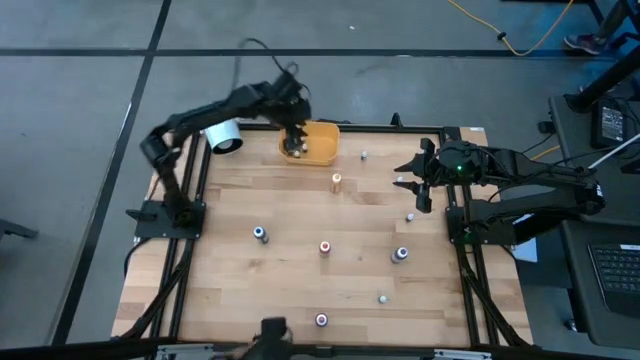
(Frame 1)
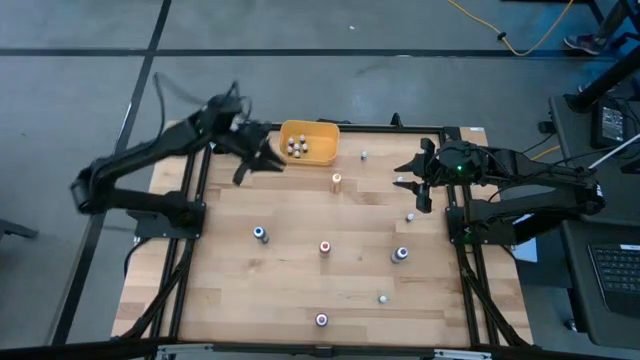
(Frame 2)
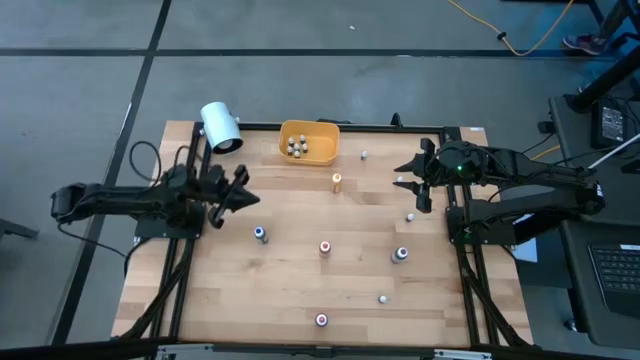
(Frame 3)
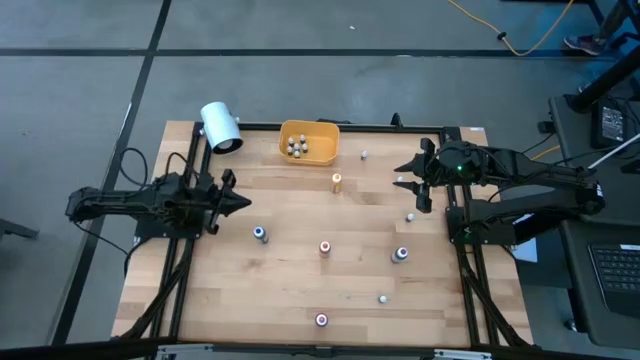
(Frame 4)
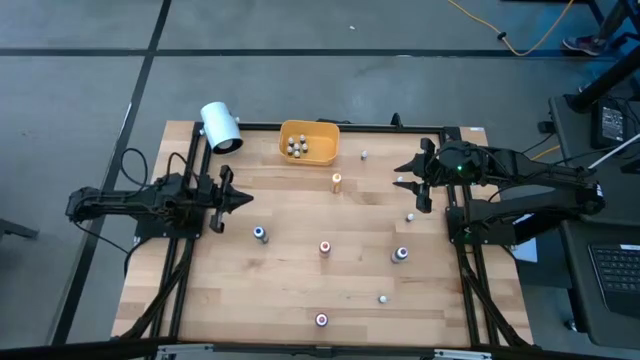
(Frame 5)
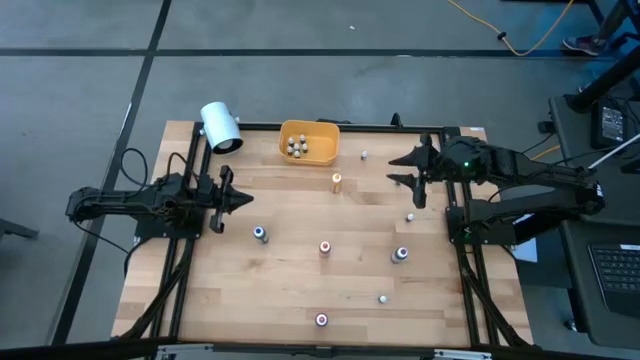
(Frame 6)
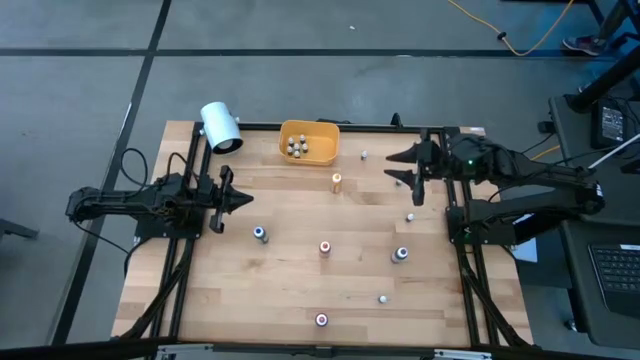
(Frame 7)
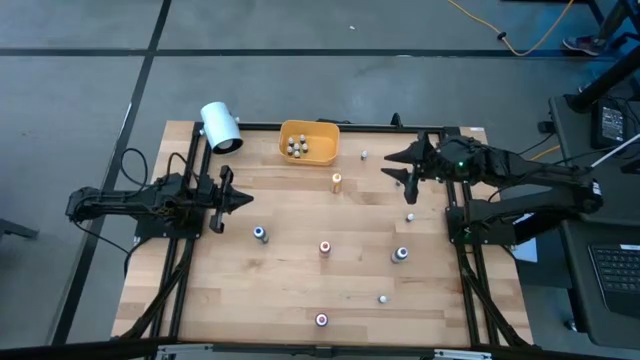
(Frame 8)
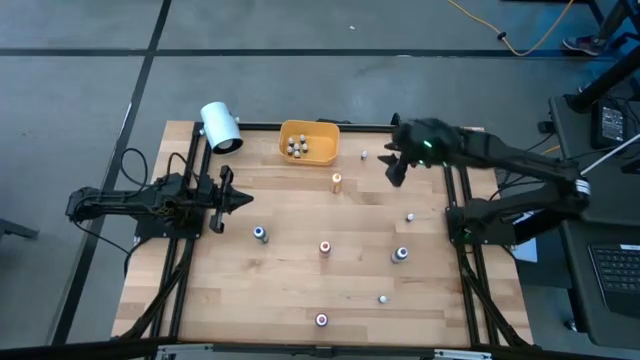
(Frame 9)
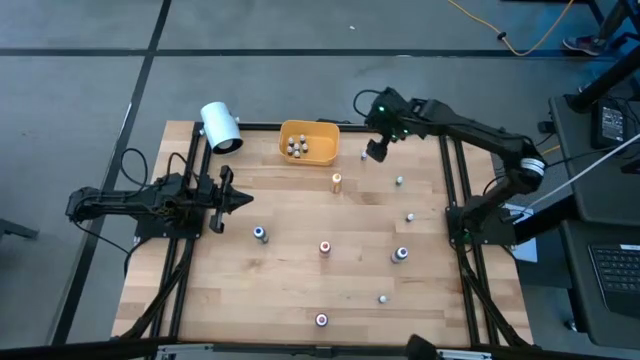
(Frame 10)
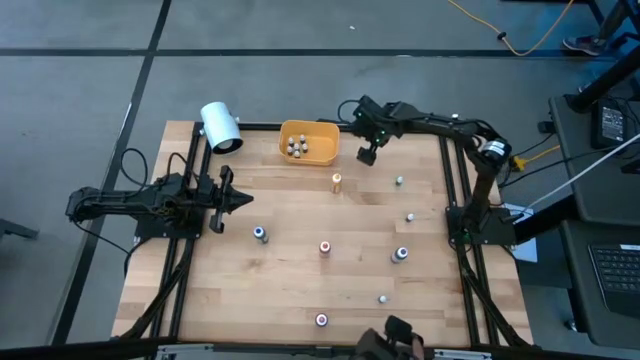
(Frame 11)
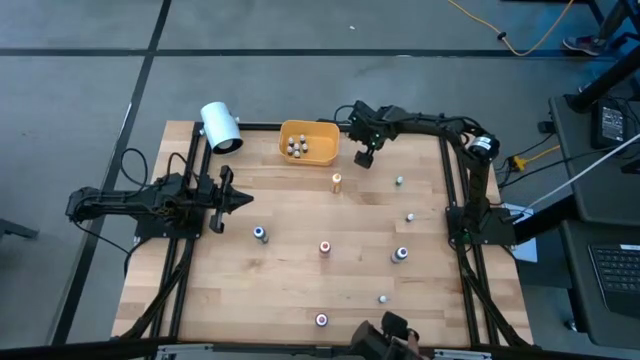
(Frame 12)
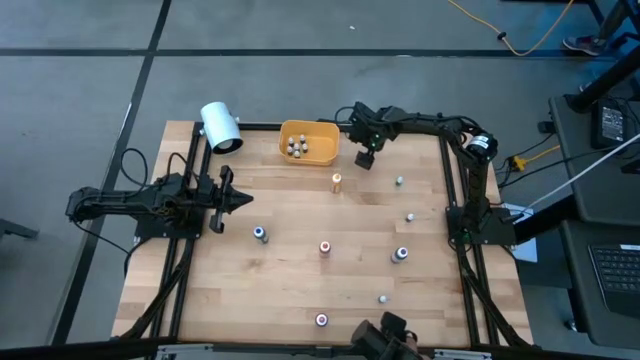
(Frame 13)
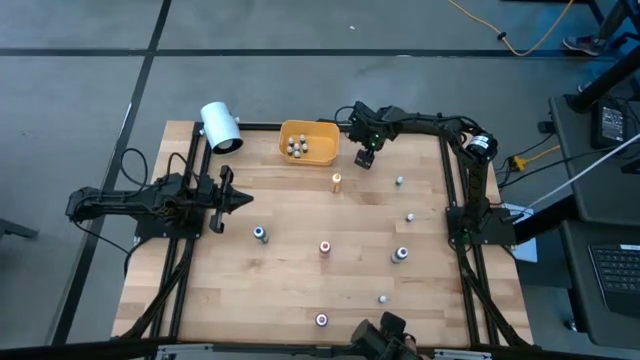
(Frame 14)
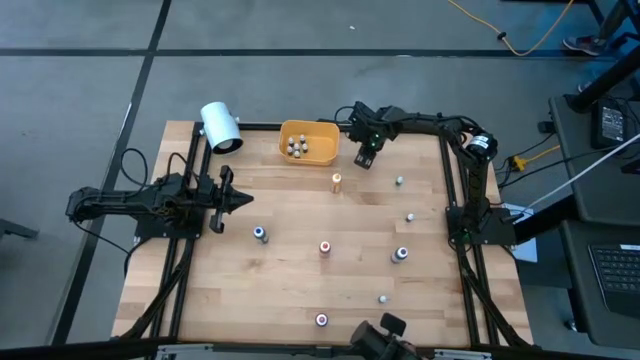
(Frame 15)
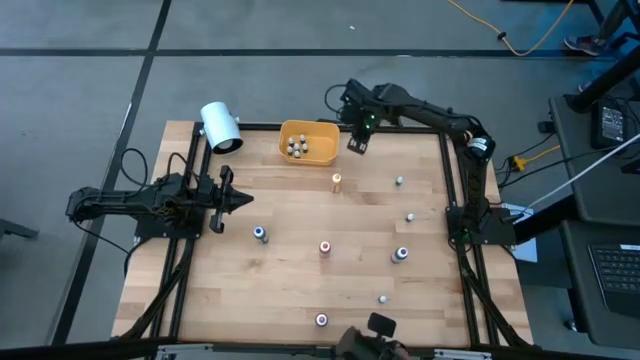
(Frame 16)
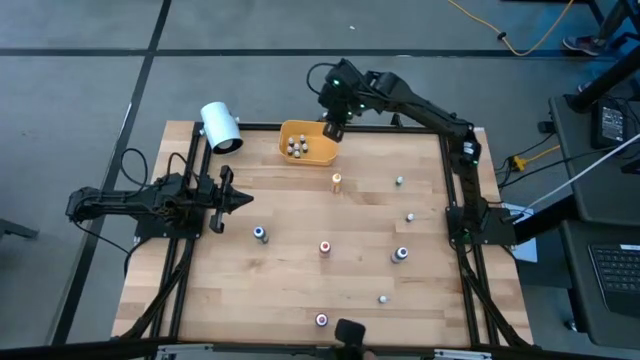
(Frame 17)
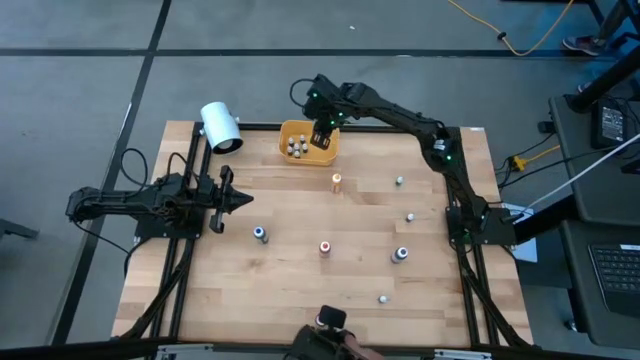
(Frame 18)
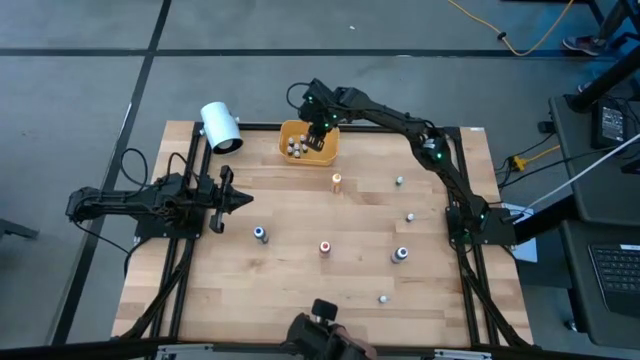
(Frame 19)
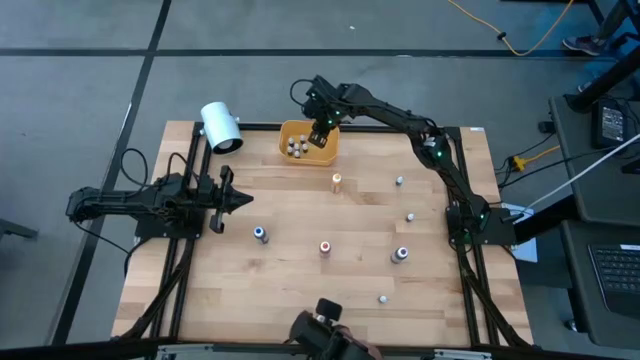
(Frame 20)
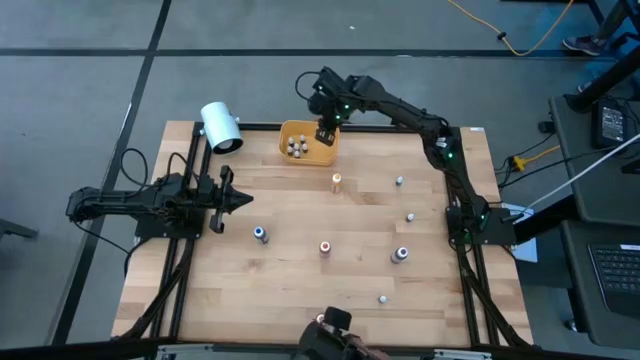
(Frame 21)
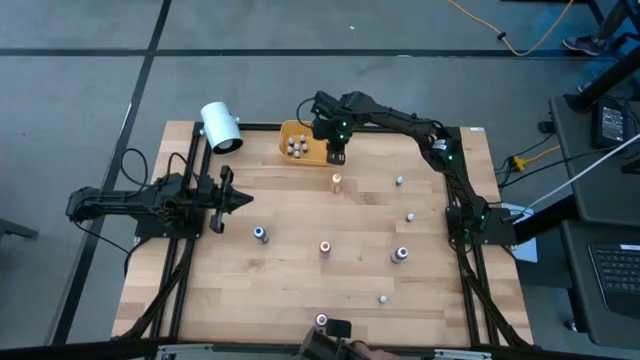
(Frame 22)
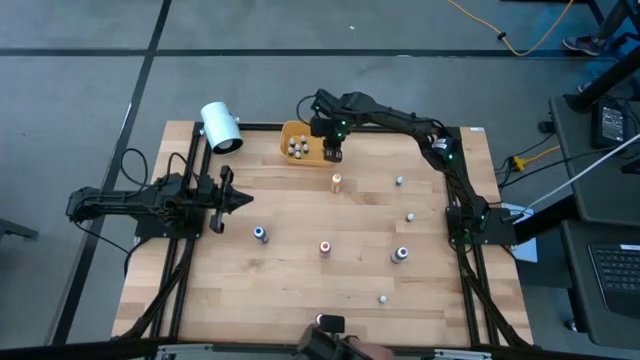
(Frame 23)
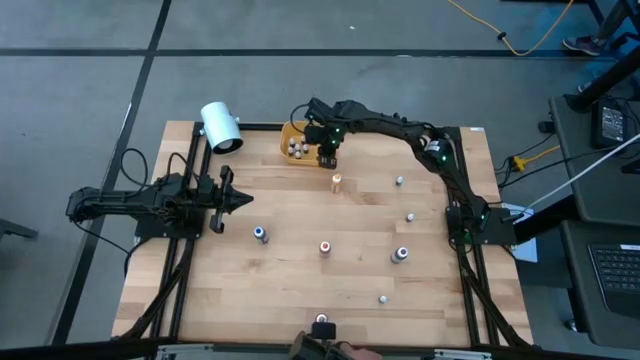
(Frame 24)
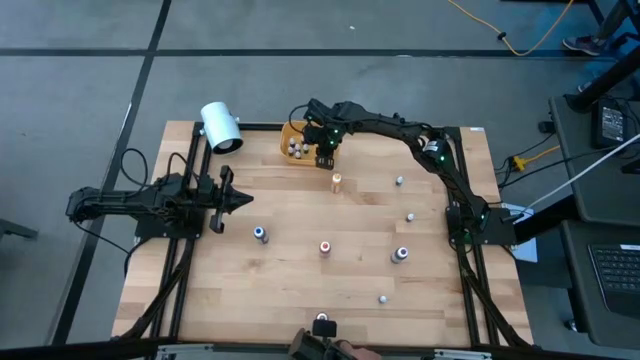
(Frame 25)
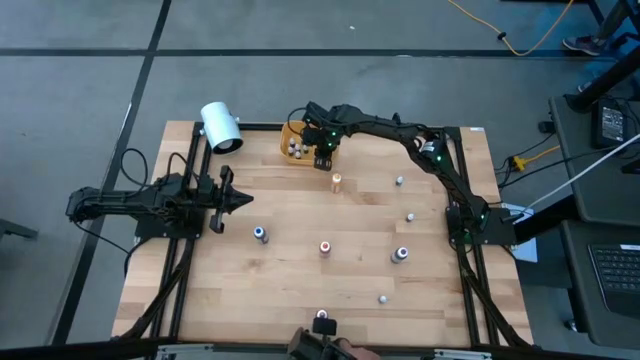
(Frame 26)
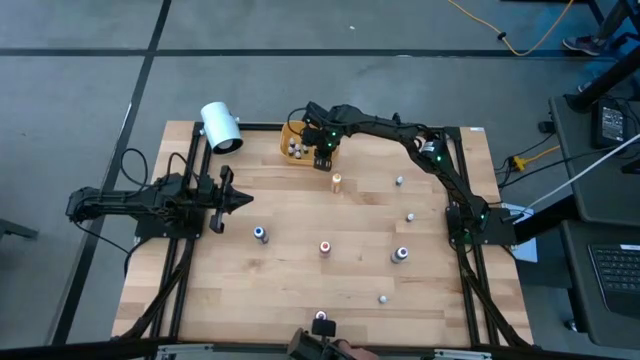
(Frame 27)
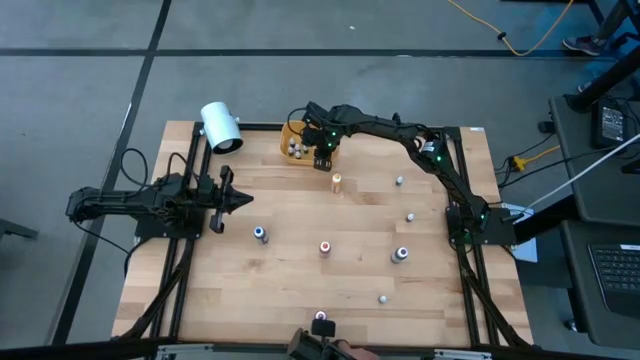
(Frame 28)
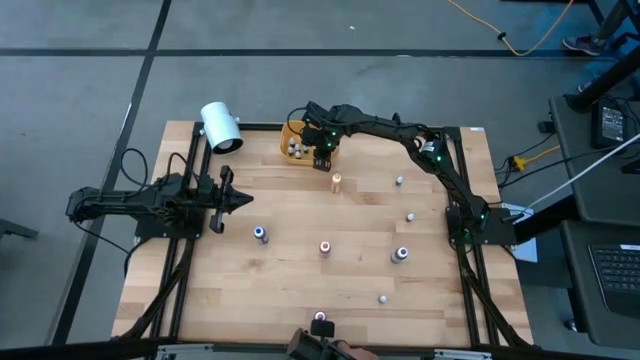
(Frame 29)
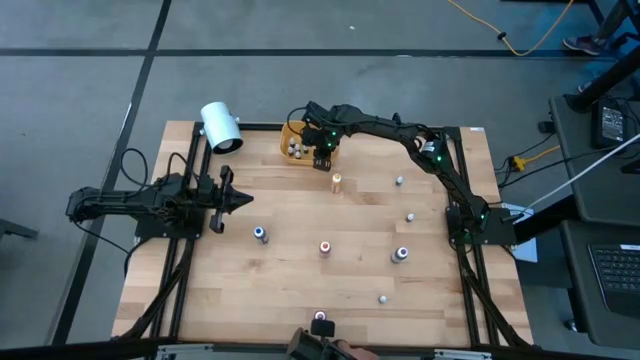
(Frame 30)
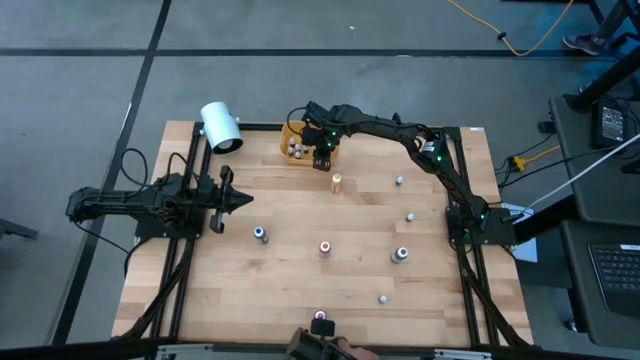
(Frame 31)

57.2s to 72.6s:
Task: Pick & Place food coloring
Put the brown food coloring bottle into the yellow bin

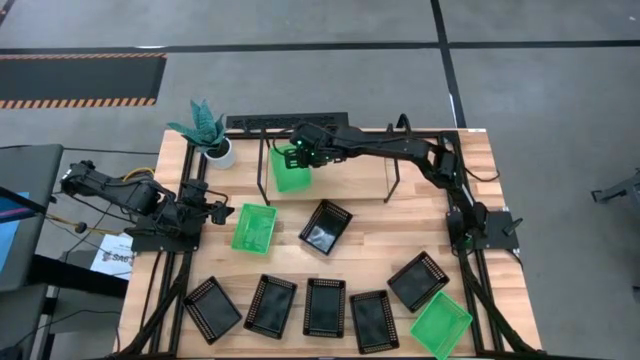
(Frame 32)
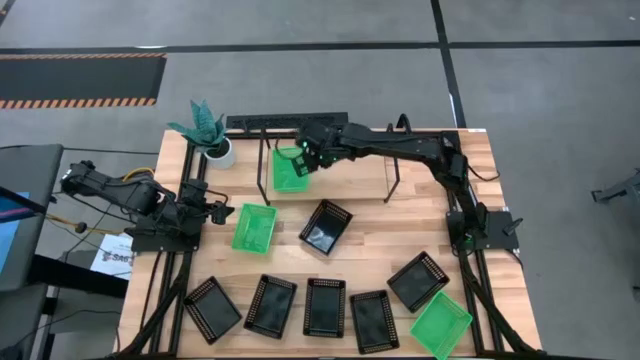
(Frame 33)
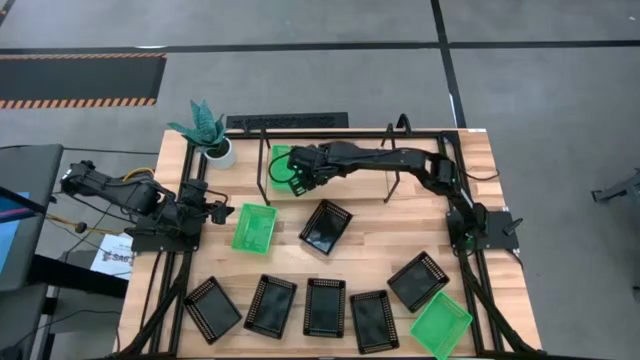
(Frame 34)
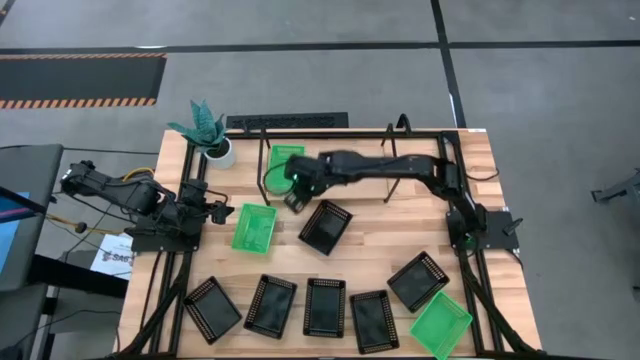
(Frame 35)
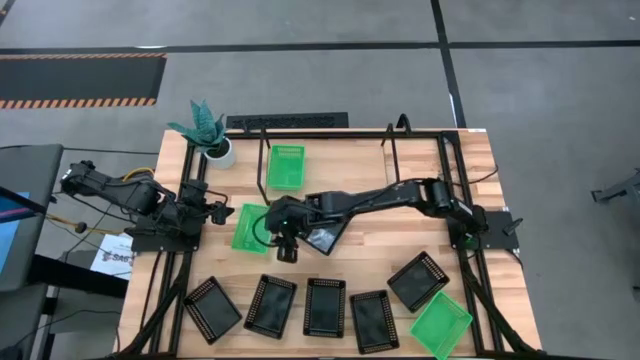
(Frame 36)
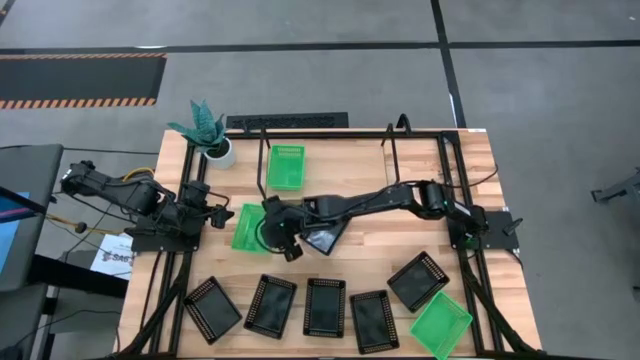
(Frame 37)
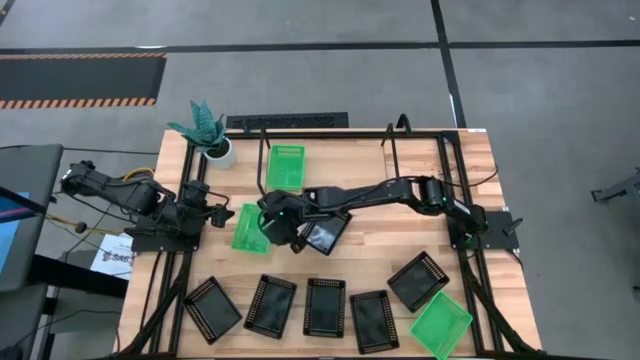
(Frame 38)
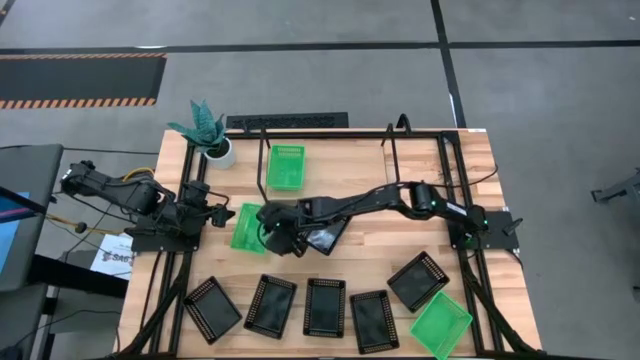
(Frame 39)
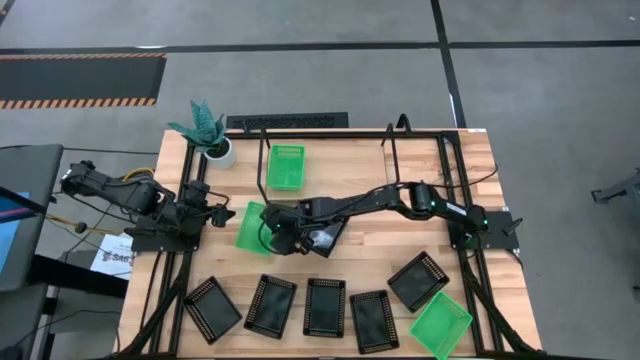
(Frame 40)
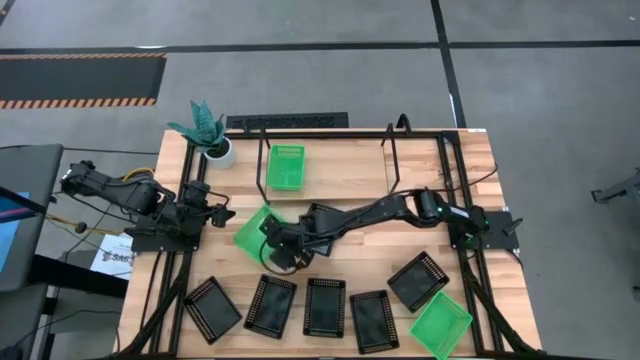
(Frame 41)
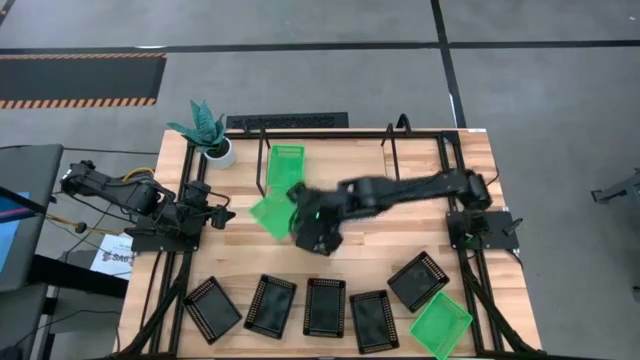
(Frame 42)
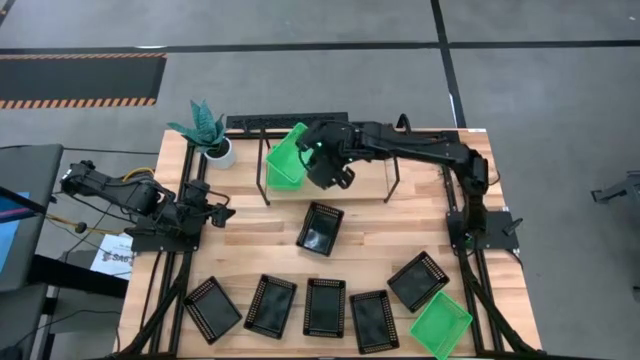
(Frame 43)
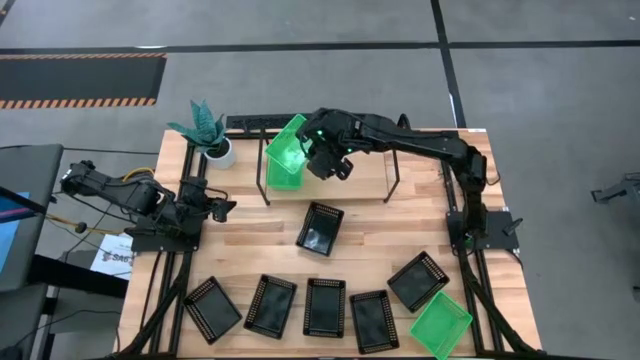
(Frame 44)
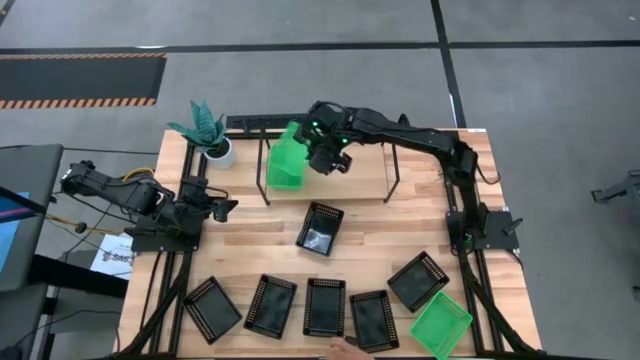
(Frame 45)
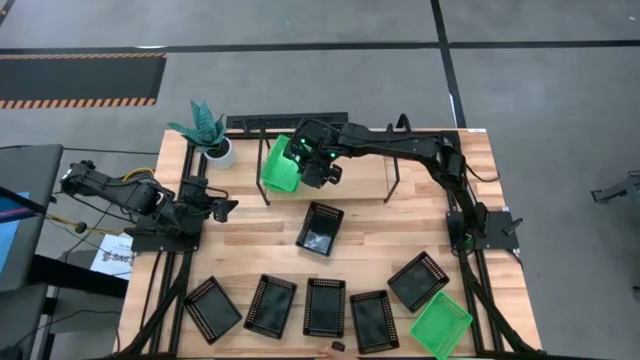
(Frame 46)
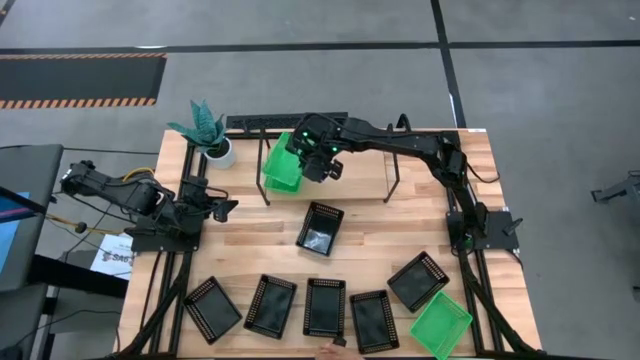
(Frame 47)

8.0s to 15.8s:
Task: Stack baskets on shelf by color
Stack the left green bin on top of the green bin on the shelf
